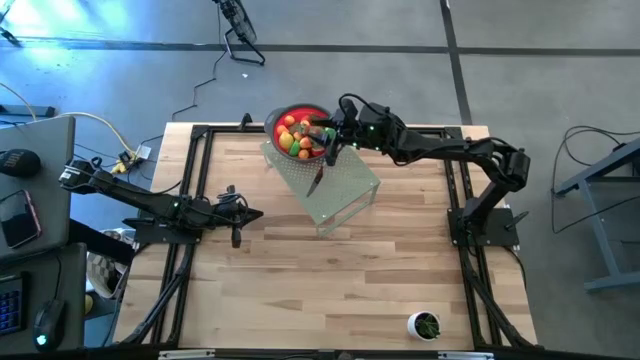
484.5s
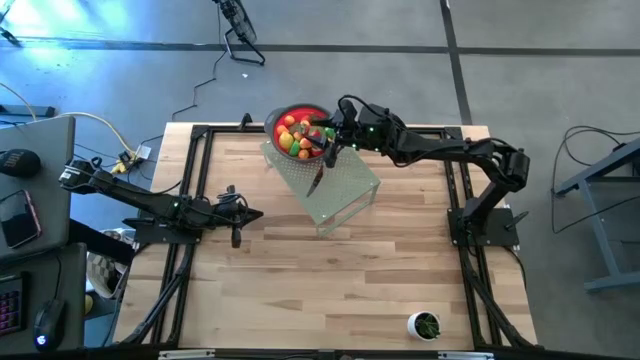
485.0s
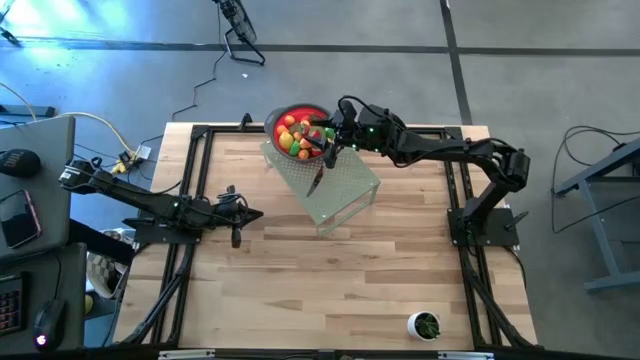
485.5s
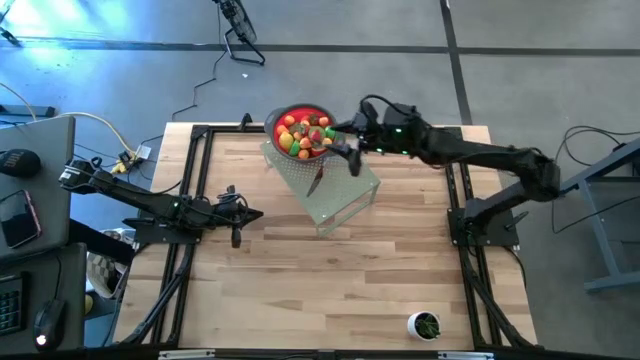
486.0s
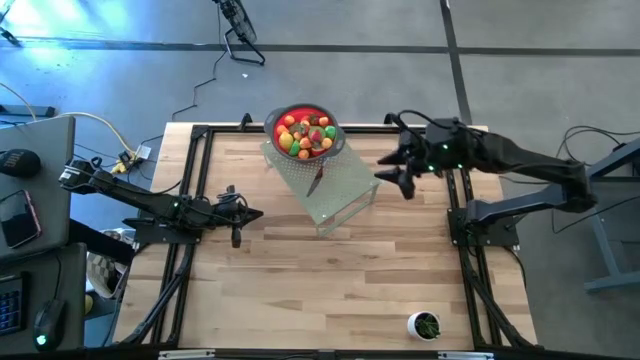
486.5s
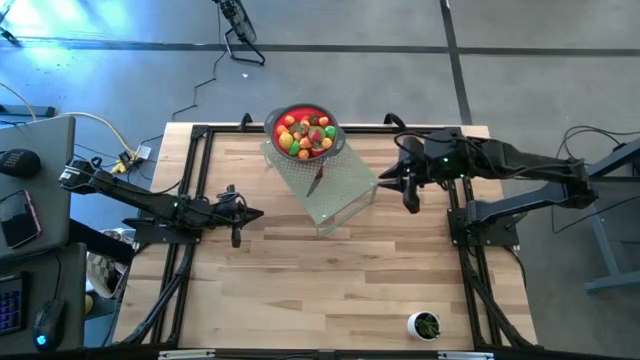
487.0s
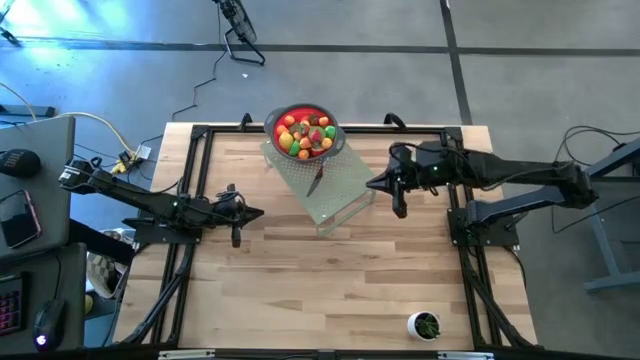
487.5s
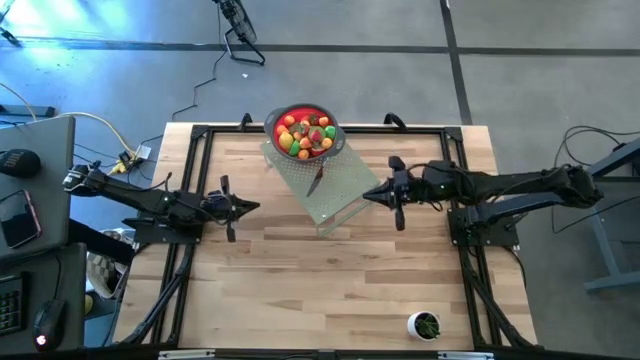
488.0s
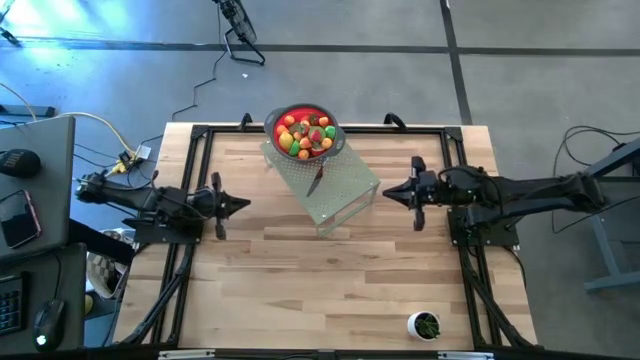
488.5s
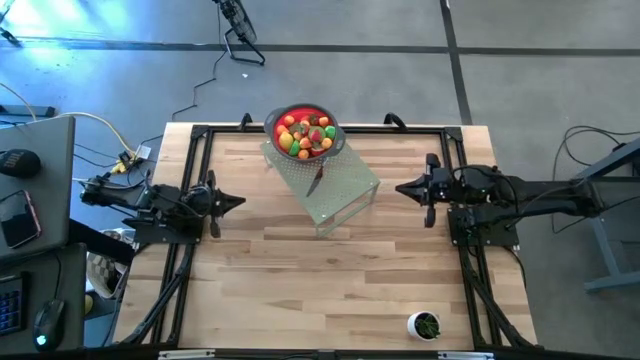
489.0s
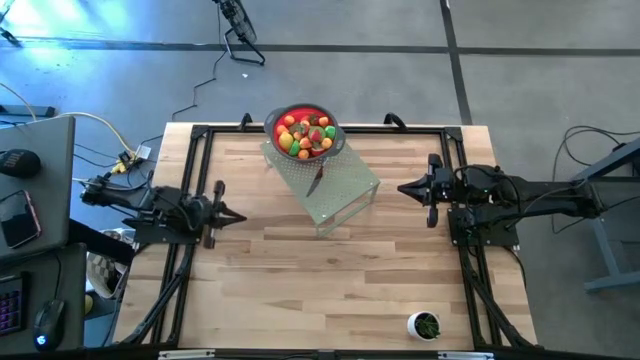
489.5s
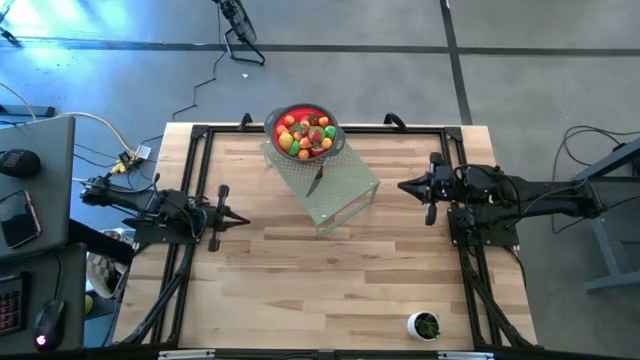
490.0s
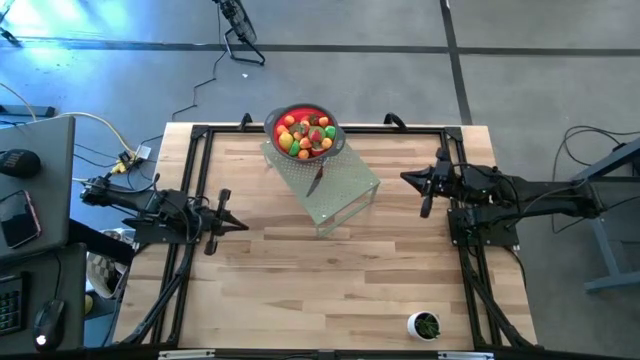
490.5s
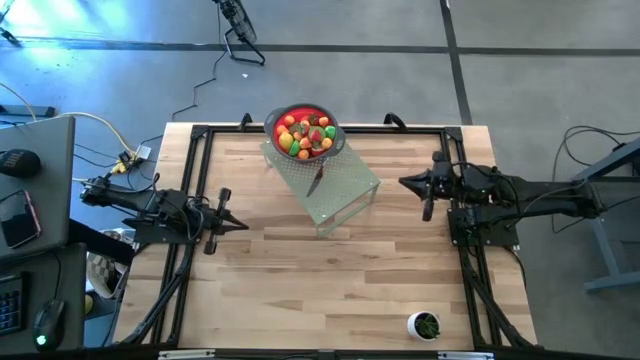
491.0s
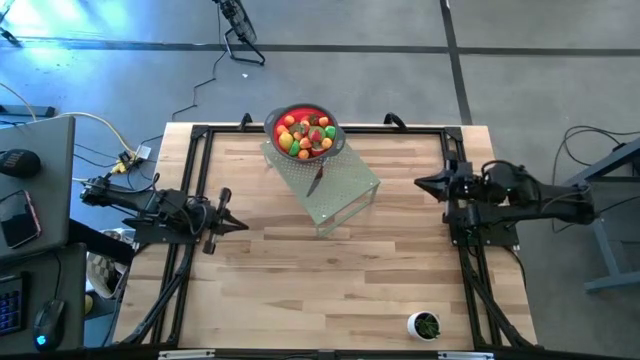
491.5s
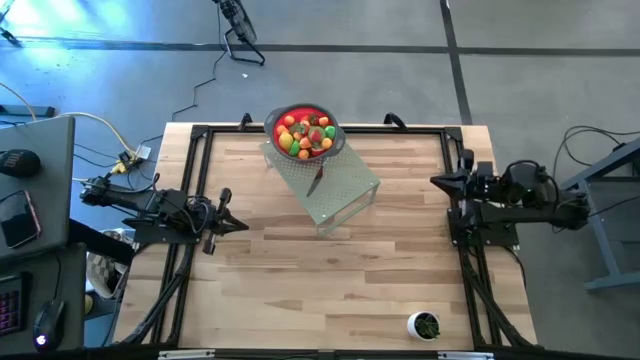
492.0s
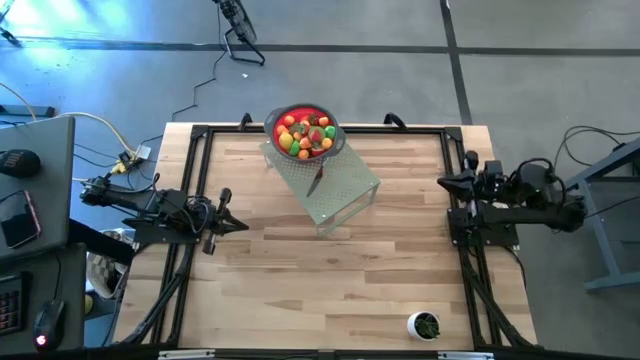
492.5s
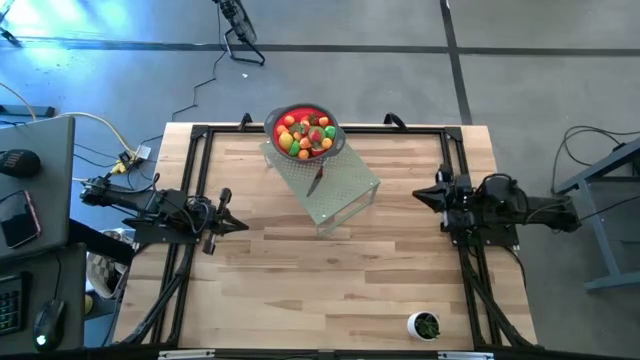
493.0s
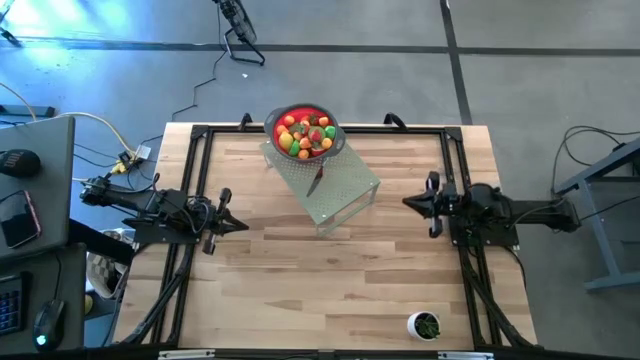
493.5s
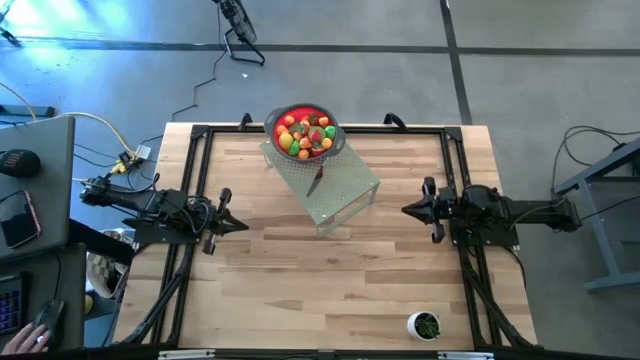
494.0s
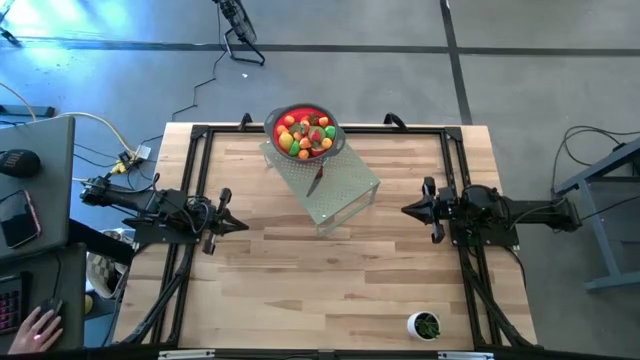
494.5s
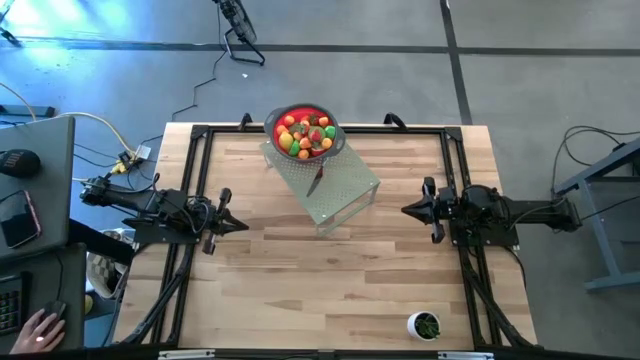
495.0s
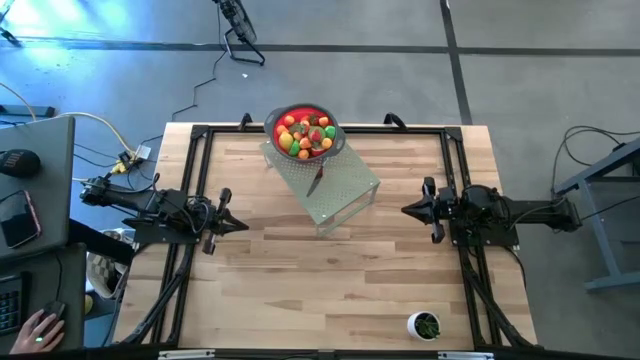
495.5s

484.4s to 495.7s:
Task: Pick & Place Fruit
Return to Home Position

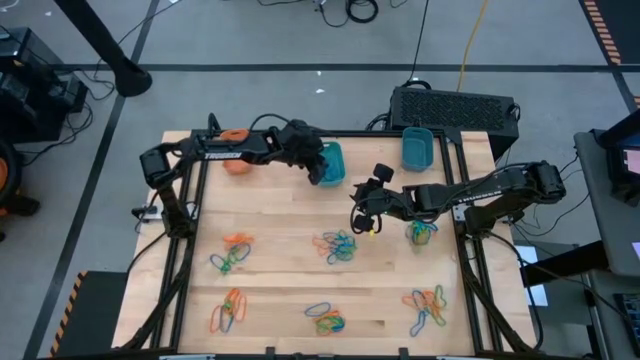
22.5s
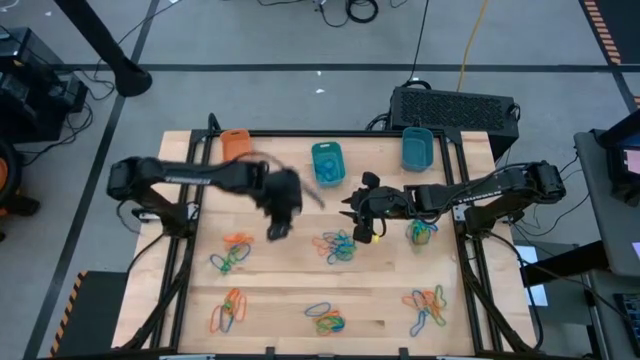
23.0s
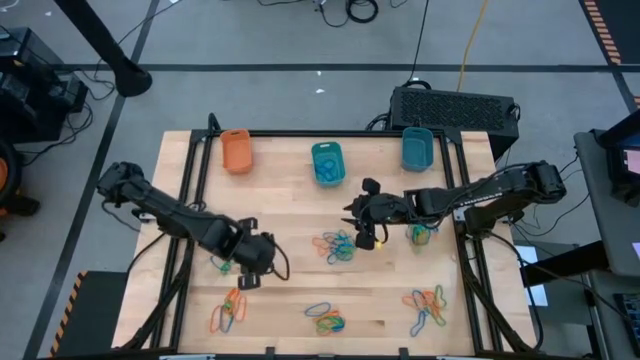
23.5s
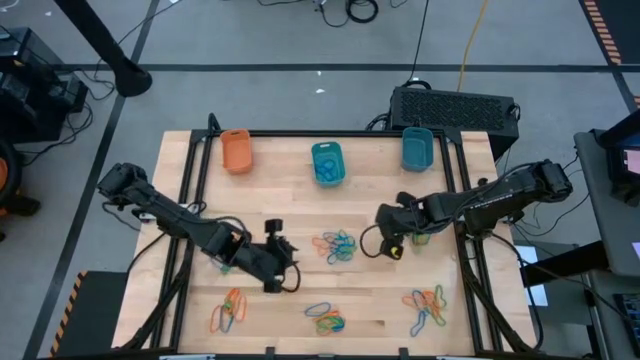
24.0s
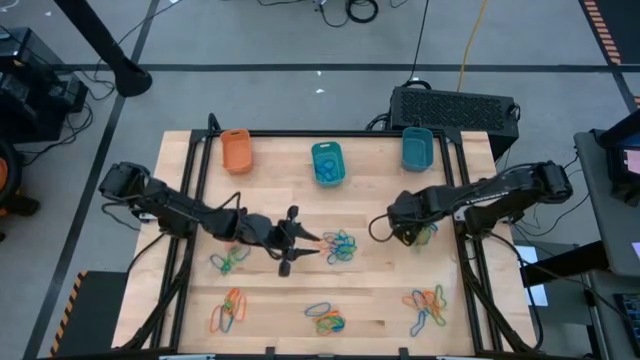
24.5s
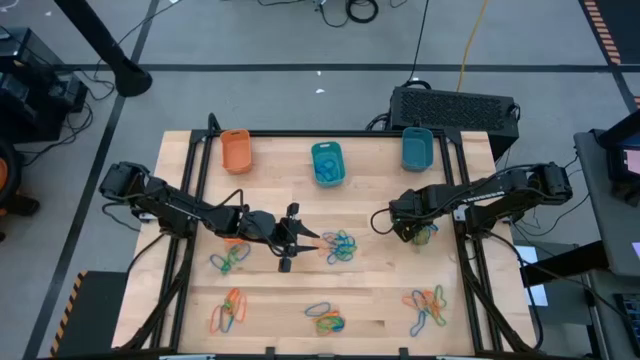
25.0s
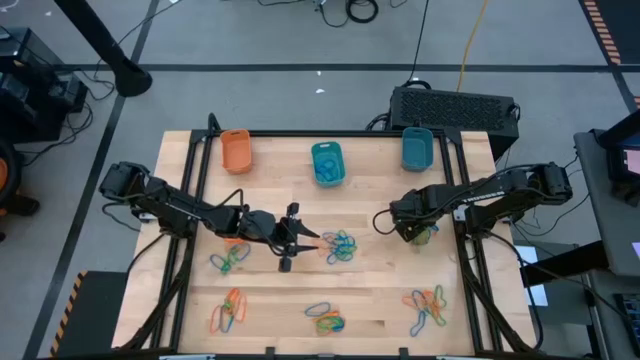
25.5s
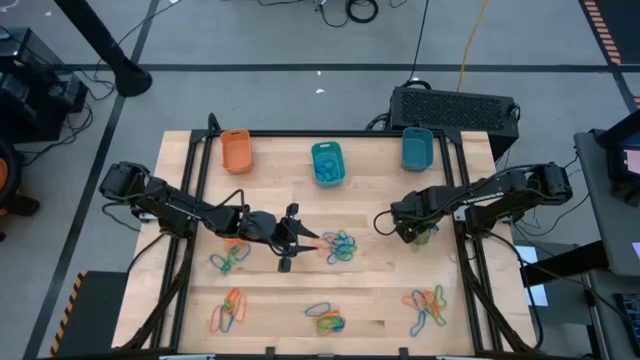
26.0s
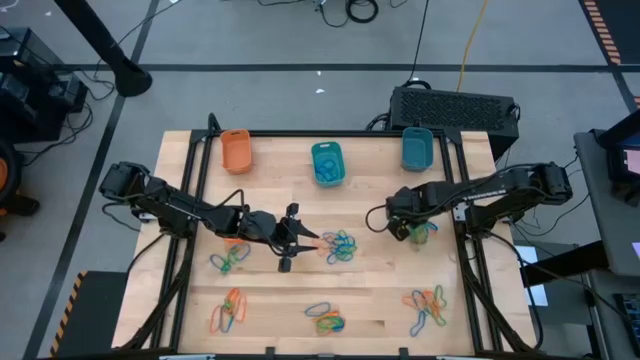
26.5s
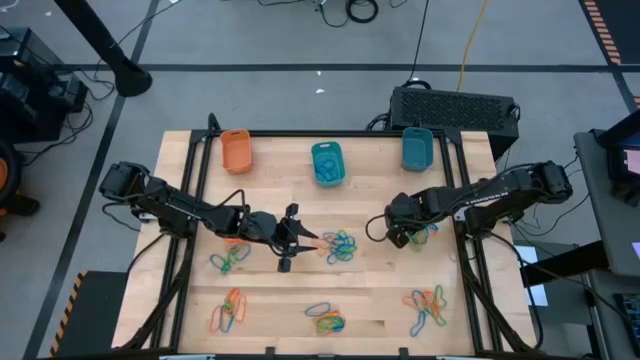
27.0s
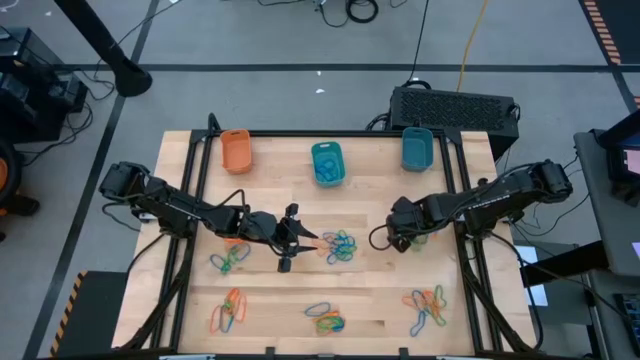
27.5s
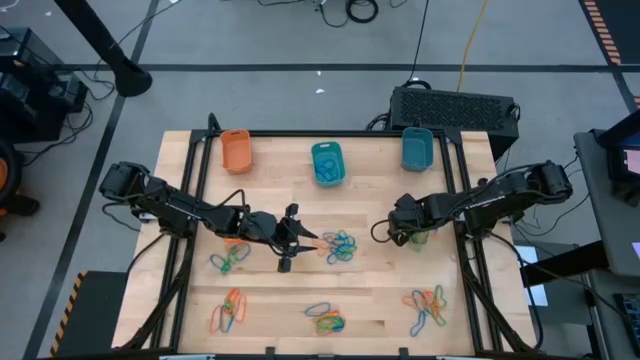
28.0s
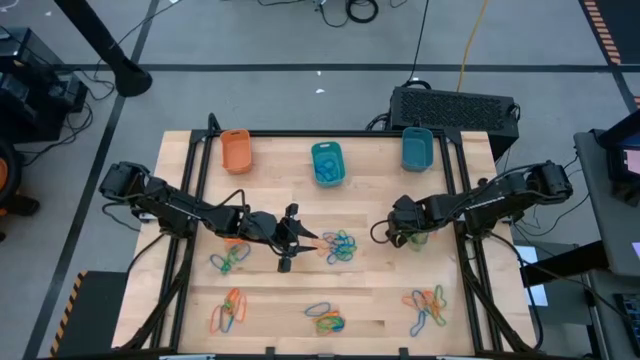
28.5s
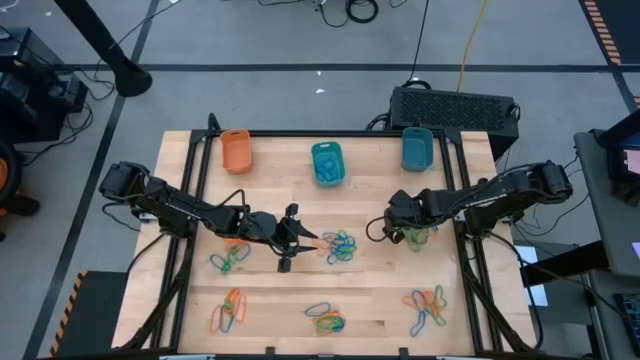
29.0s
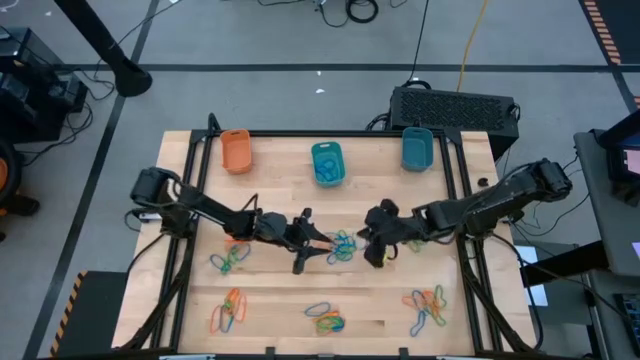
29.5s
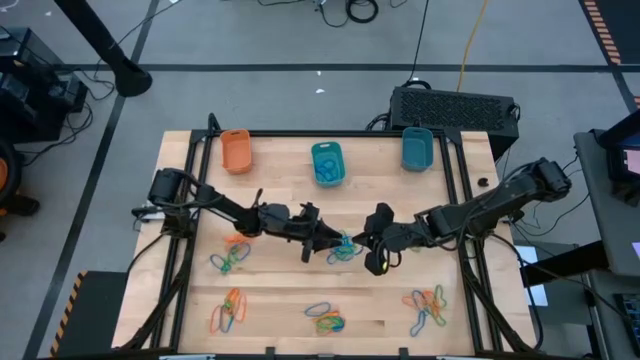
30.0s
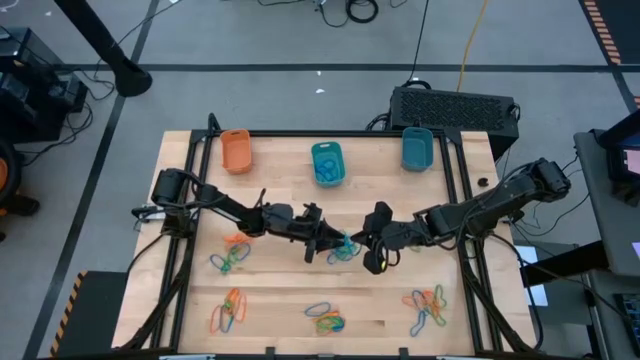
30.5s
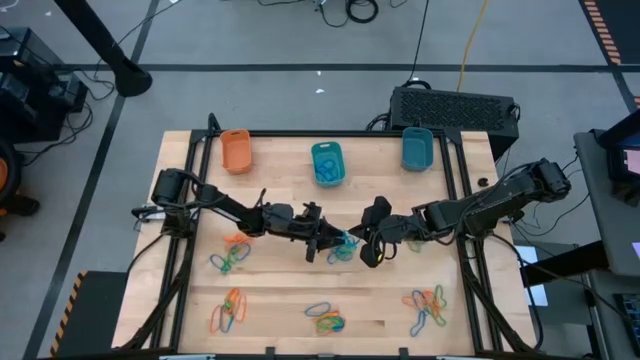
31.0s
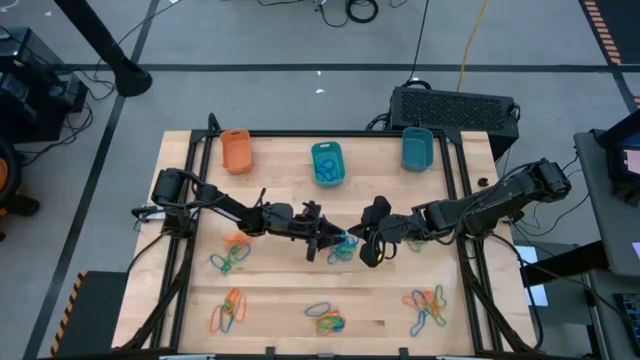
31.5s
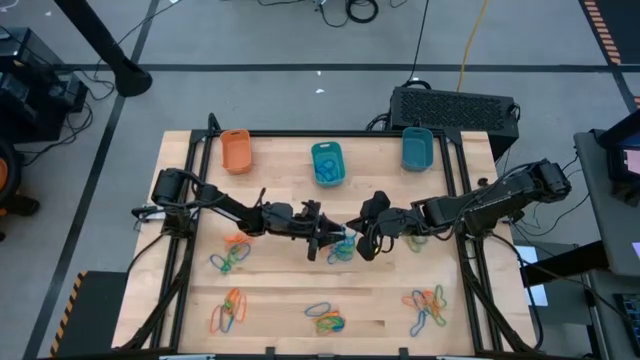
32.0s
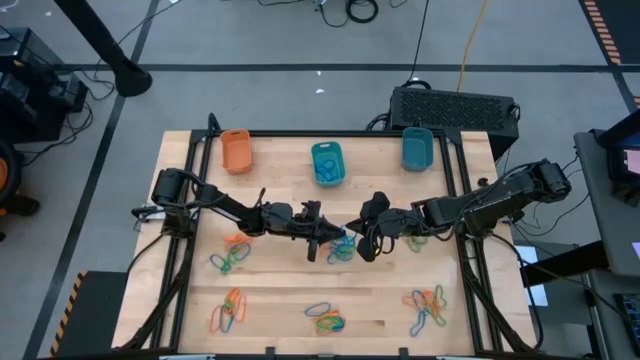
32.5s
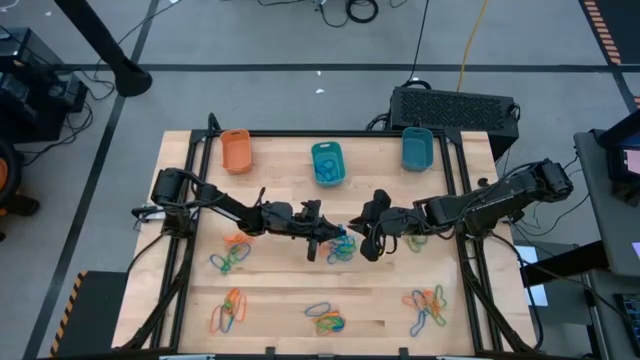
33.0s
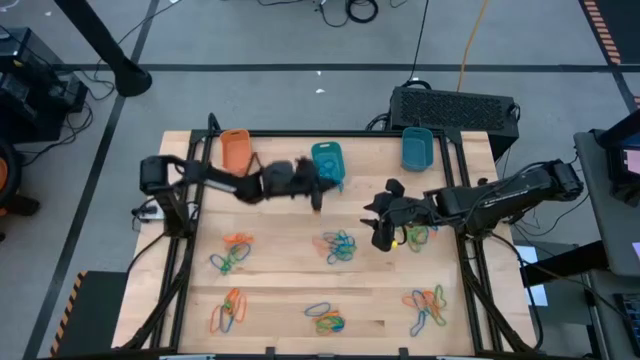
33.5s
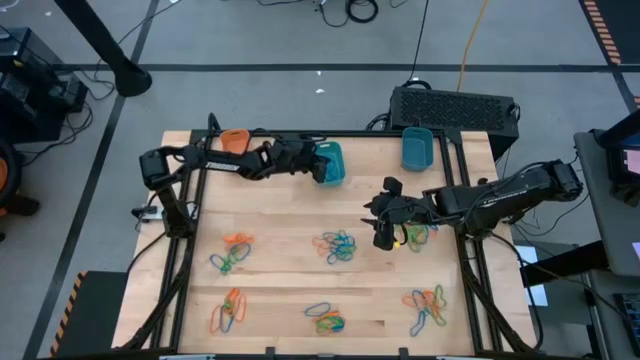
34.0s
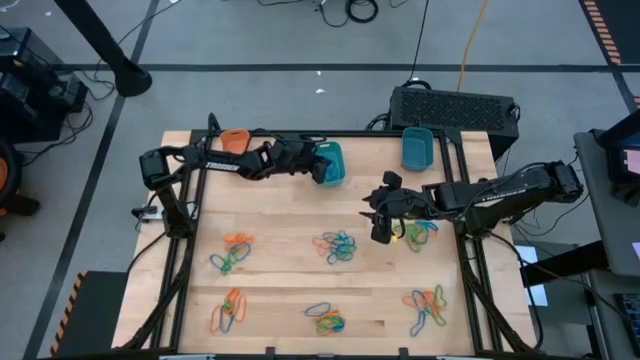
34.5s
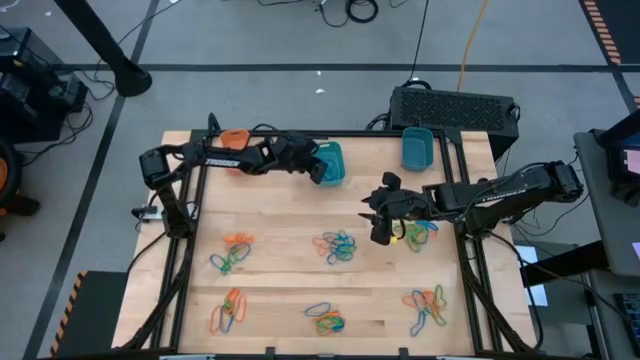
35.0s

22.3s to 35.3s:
Task: Sort rubber bands into baskets
Put the blue rubber band into the light blue bin
